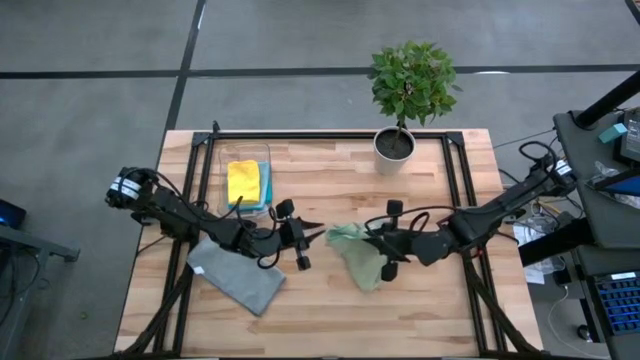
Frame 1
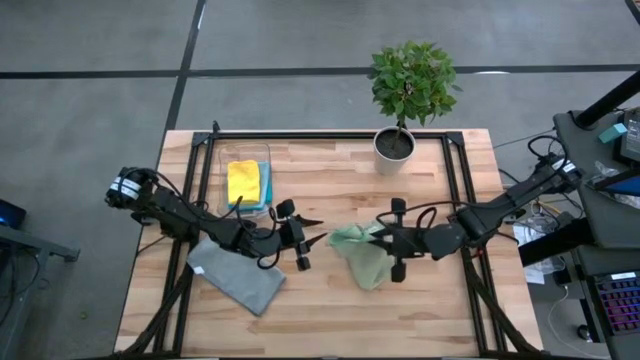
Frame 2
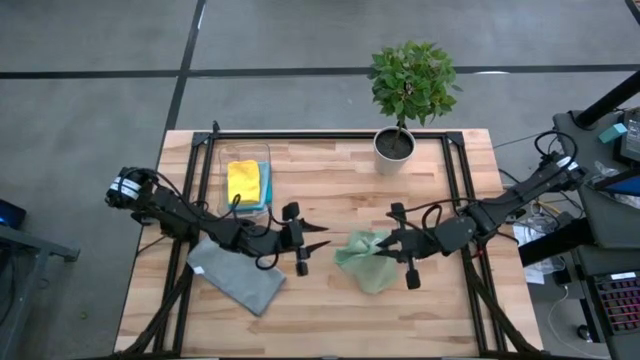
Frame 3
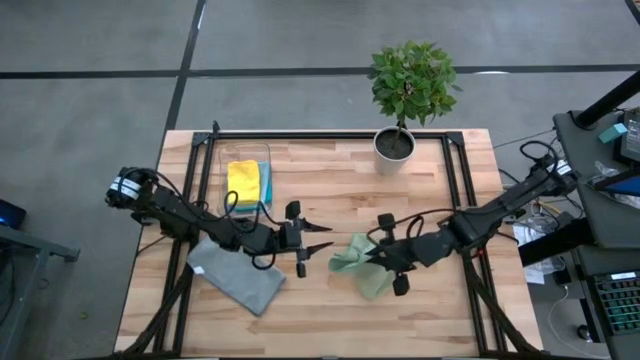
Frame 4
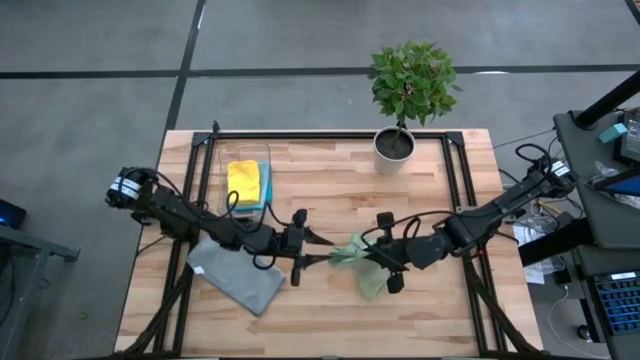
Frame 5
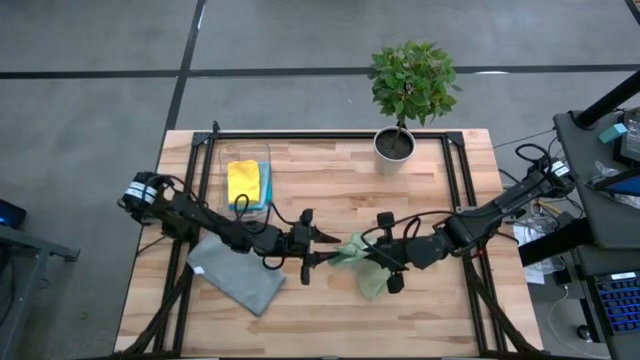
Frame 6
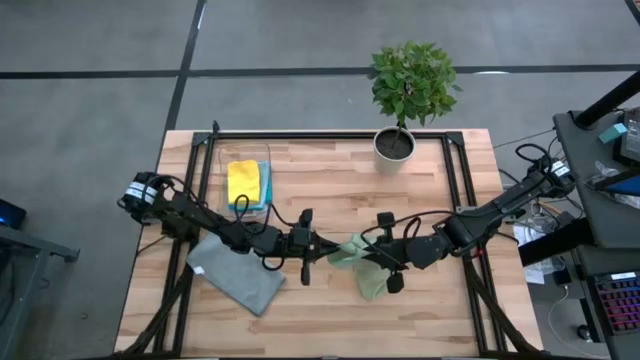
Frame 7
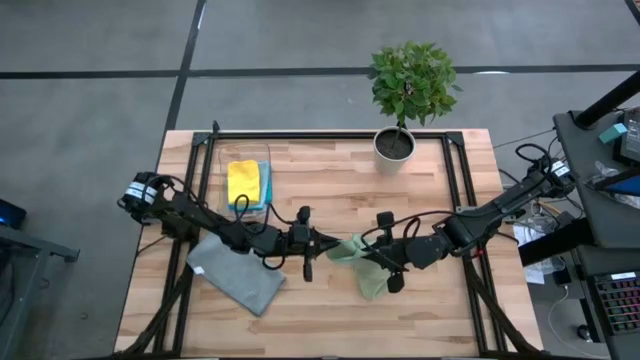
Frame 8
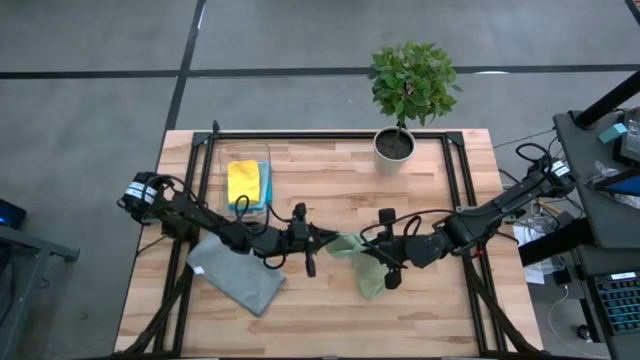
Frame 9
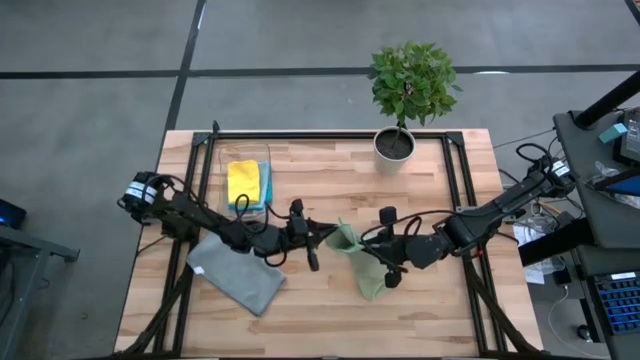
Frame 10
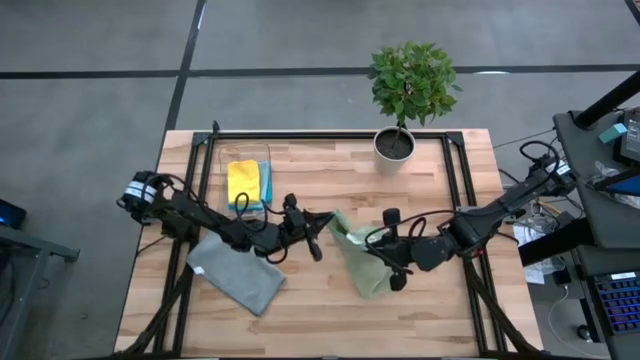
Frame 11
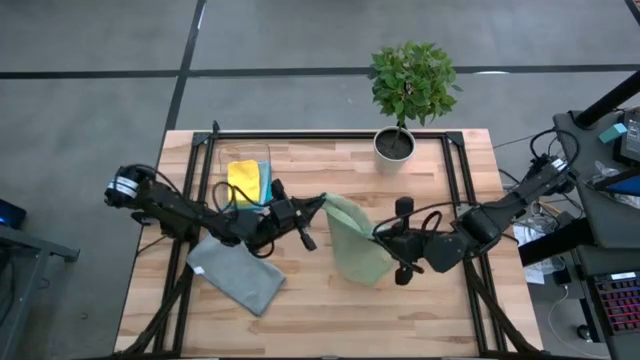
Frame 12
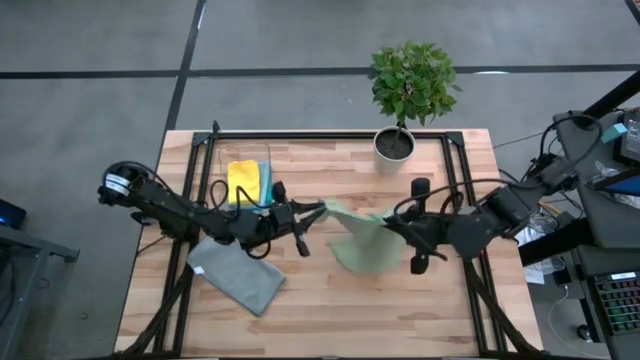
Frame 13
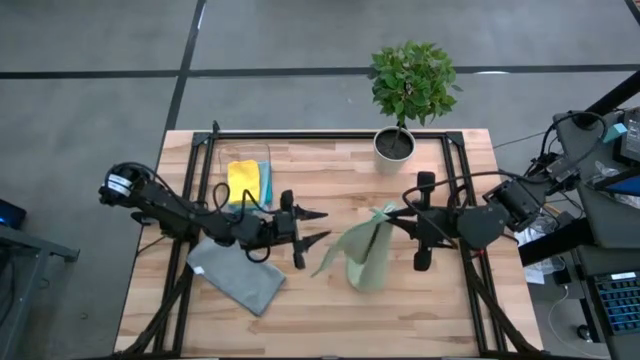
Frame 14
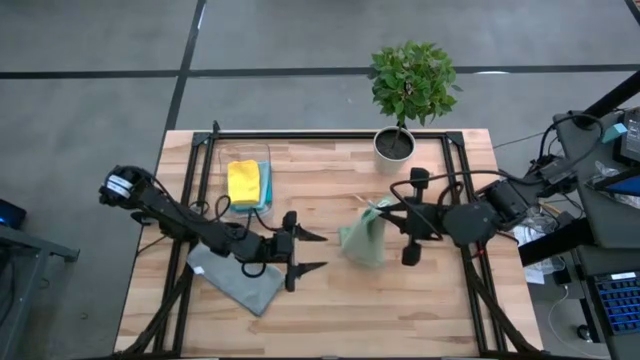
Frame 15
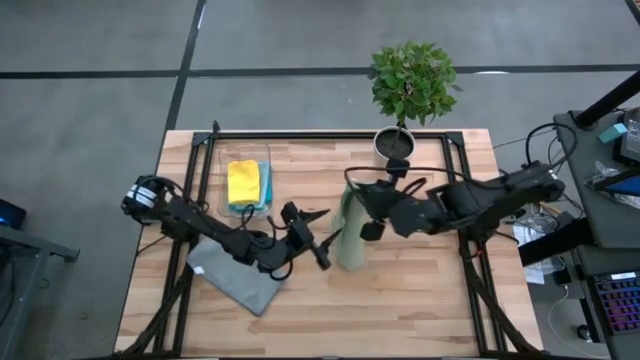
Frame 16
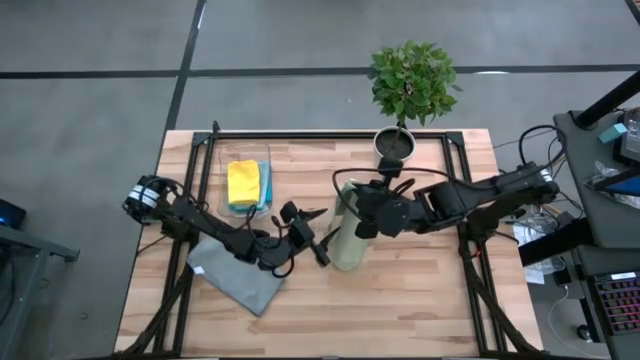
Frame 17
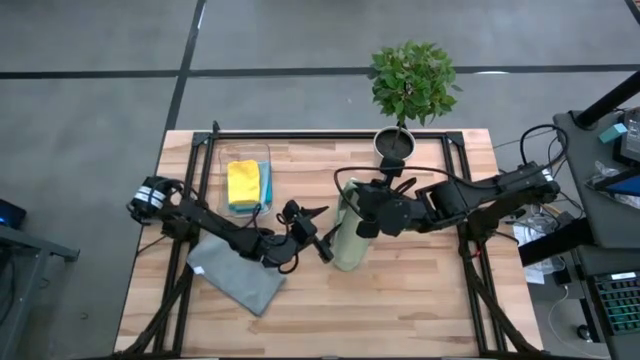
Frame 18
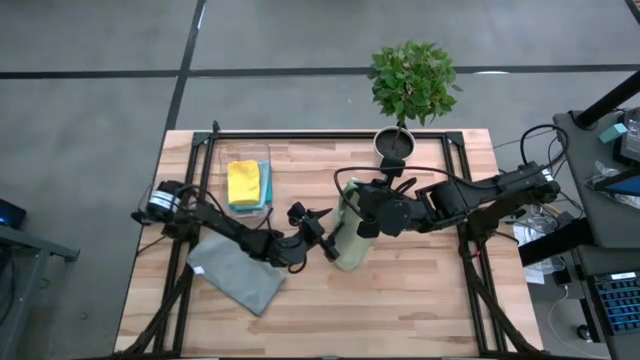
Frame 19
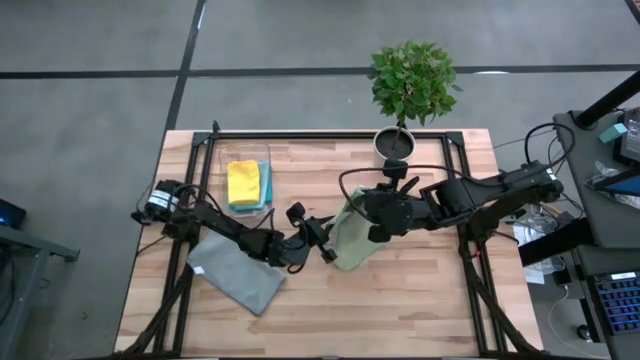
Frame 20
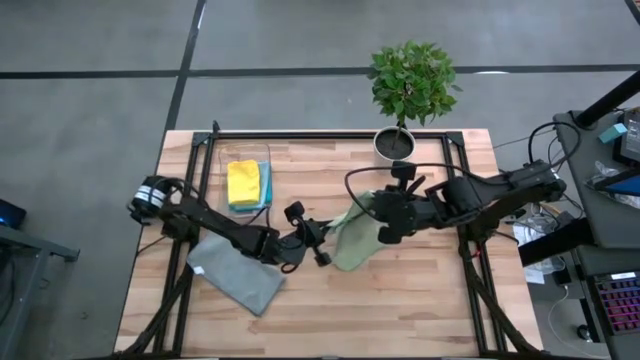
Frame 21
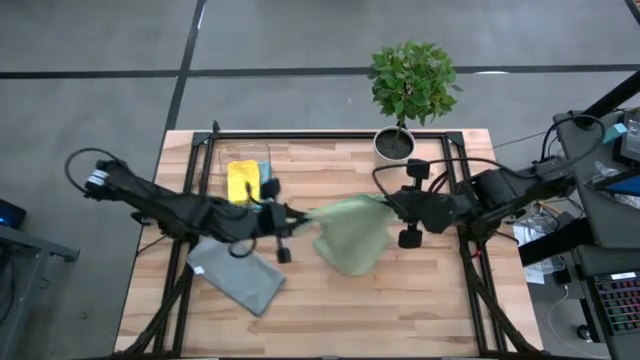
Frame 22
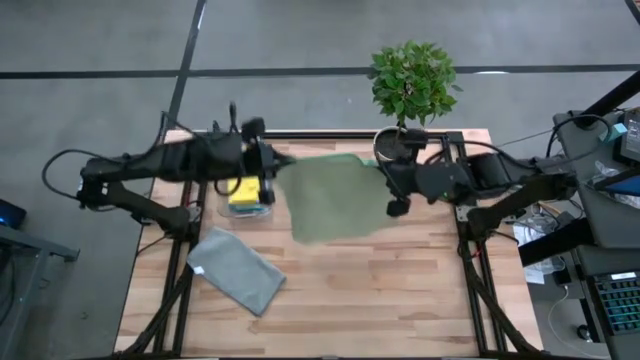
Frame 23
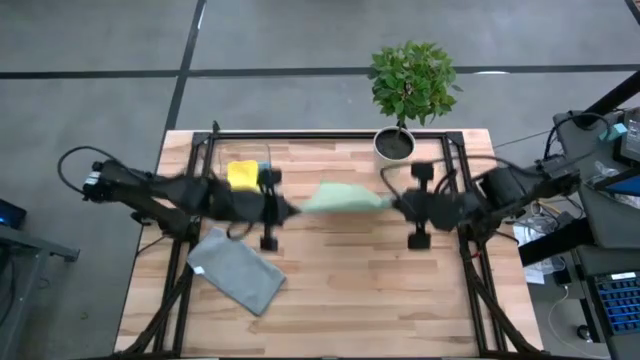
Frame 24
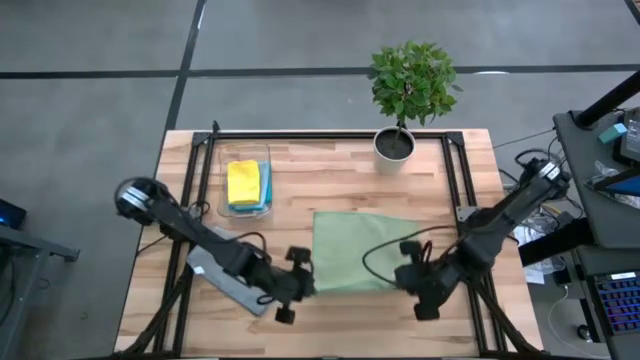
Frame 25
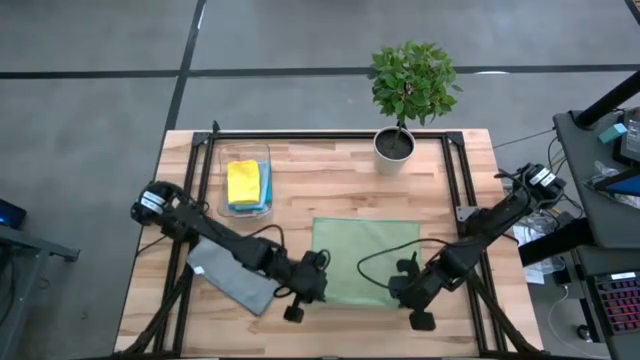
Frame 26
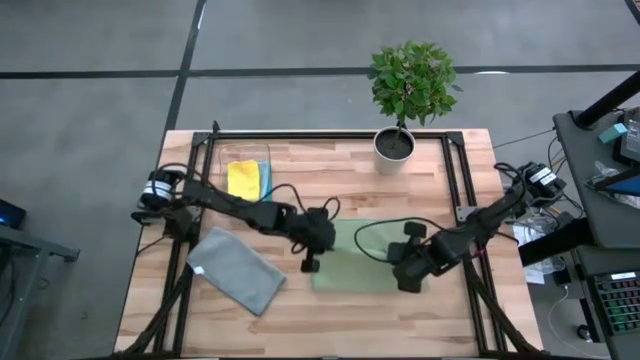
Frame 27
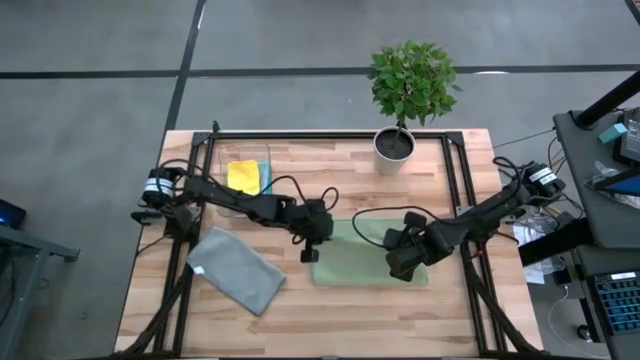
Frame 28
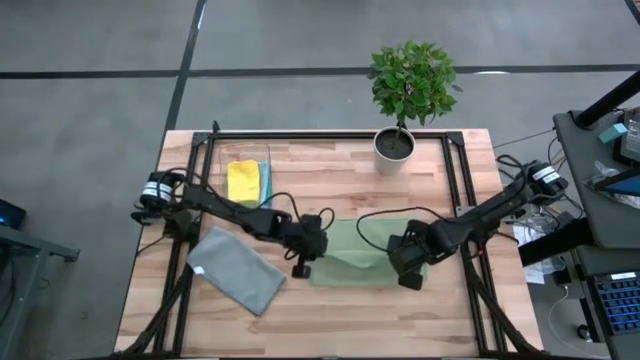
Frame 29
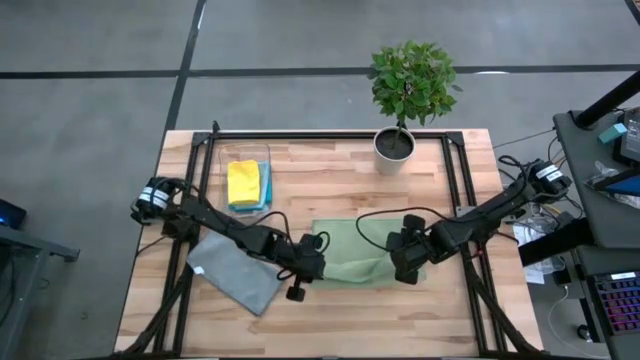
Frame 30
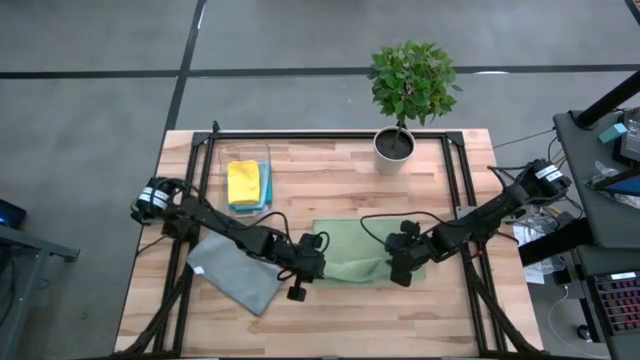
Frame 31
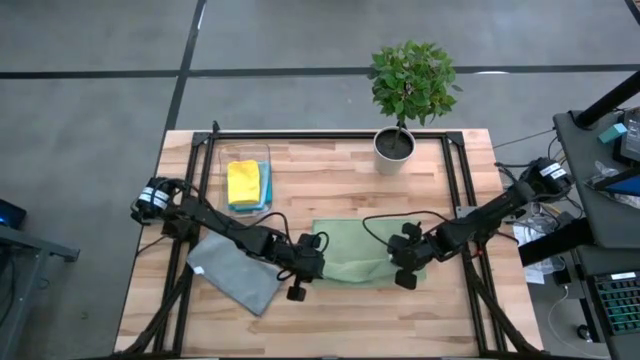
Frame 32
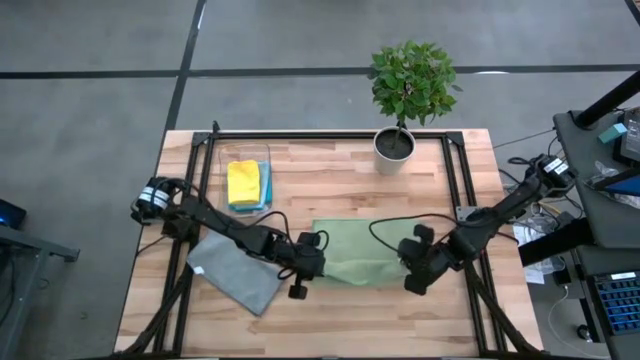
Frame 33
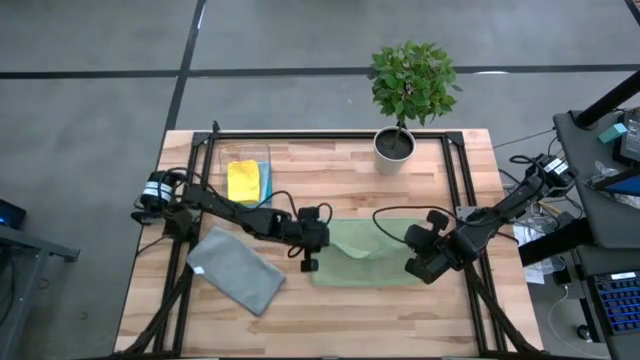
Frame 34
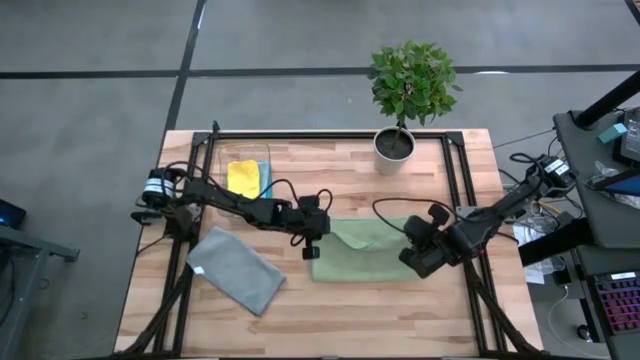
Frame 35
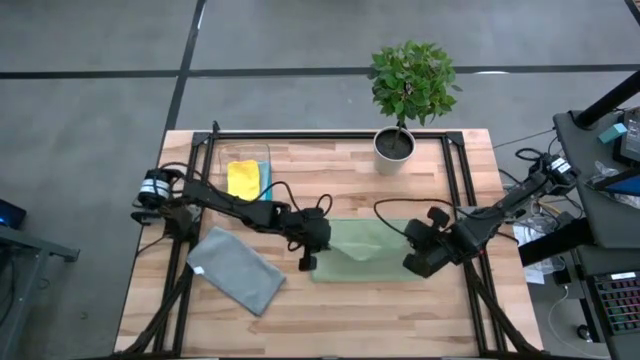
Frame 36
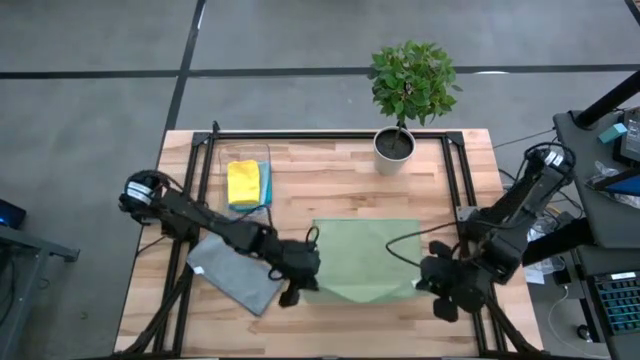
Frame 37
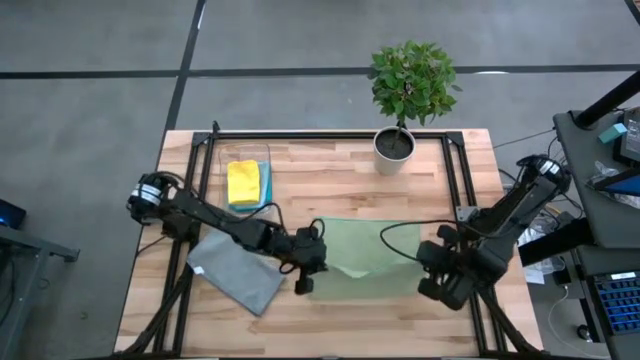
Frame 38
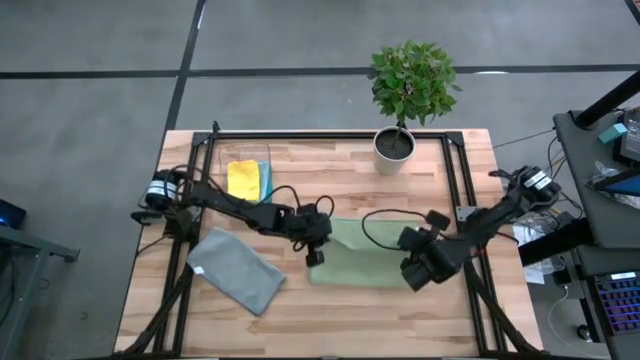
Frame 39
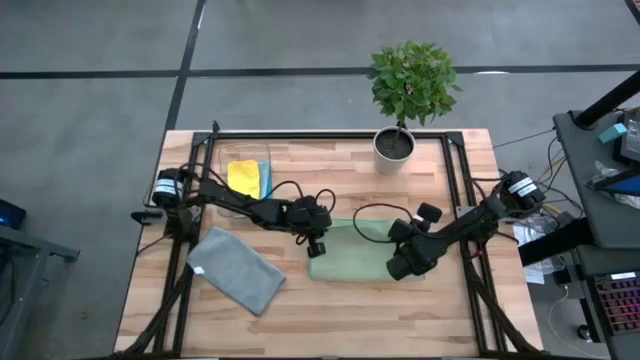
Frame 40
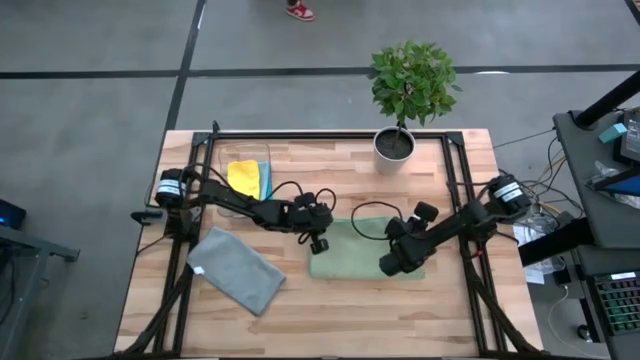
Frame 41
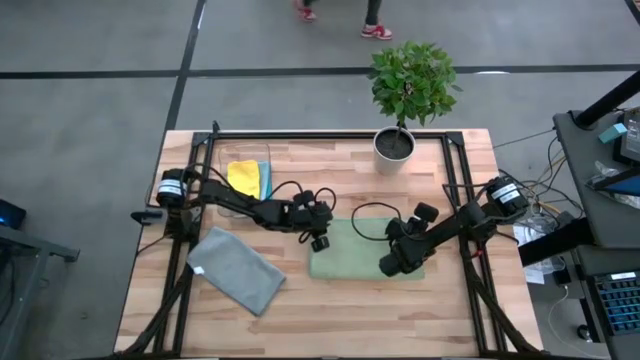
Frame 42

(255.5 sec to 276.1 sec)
Task: Fold microfiber towels
Fold the light green microfiber towel
